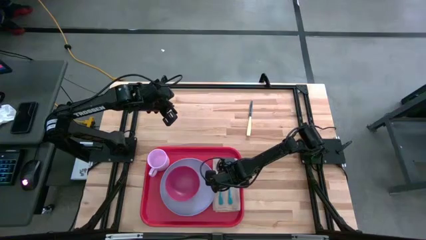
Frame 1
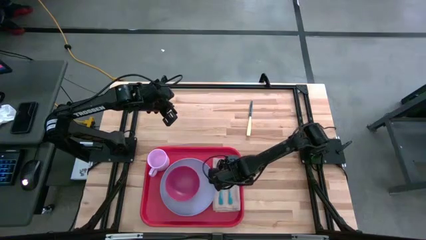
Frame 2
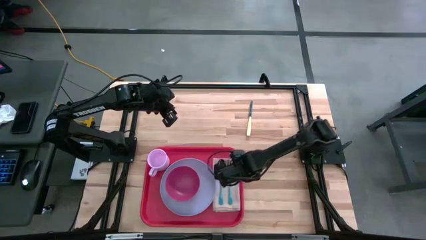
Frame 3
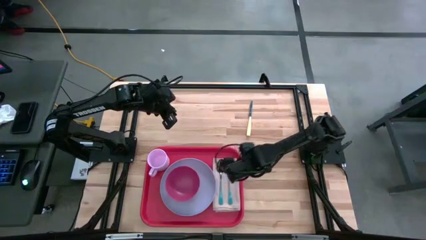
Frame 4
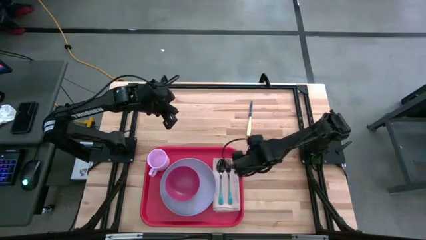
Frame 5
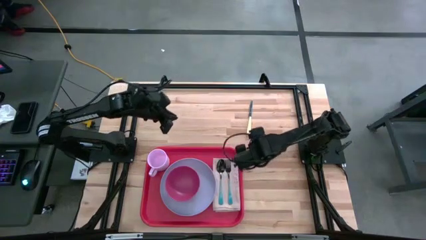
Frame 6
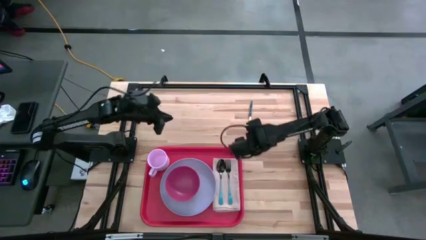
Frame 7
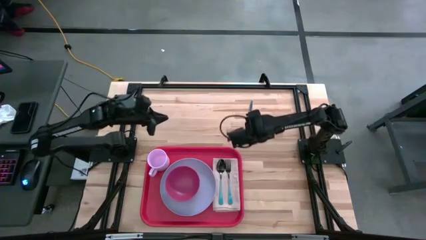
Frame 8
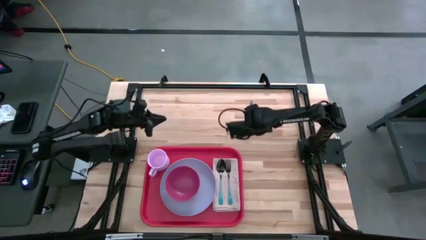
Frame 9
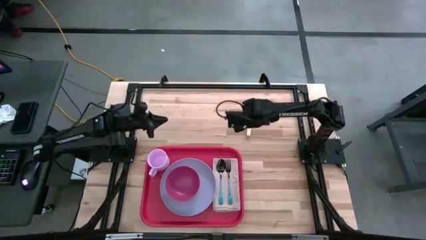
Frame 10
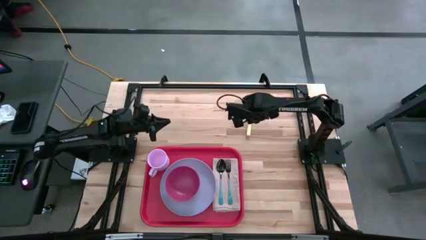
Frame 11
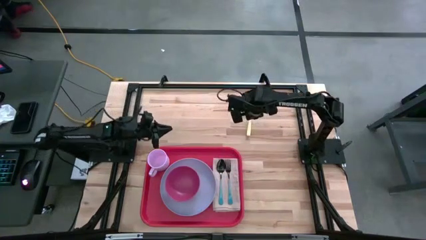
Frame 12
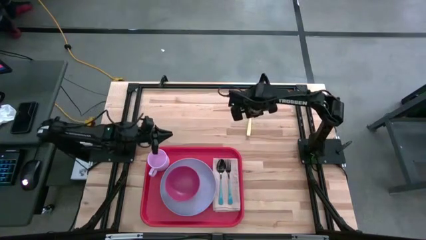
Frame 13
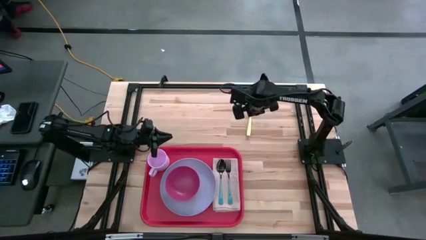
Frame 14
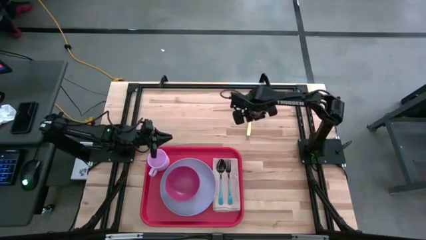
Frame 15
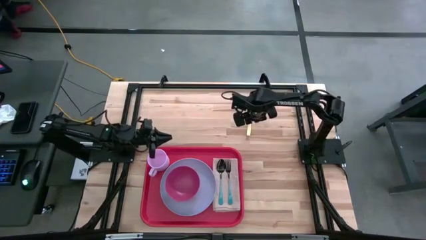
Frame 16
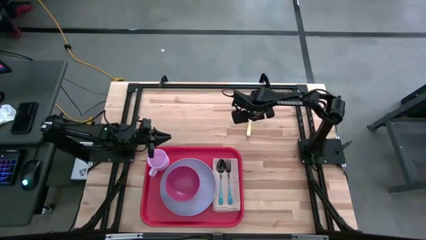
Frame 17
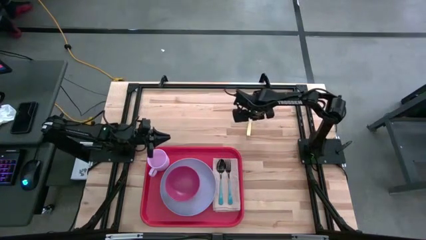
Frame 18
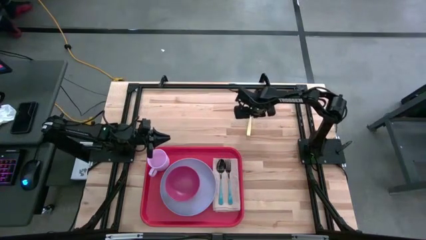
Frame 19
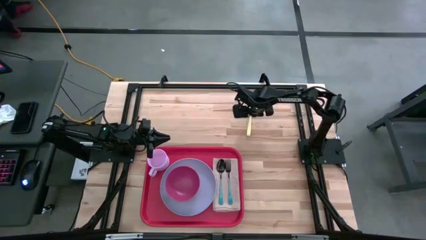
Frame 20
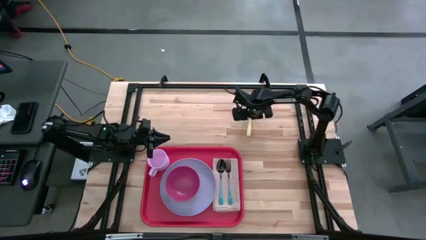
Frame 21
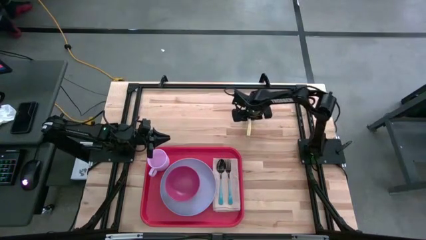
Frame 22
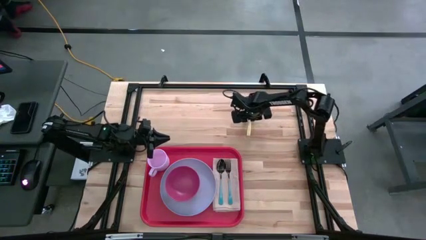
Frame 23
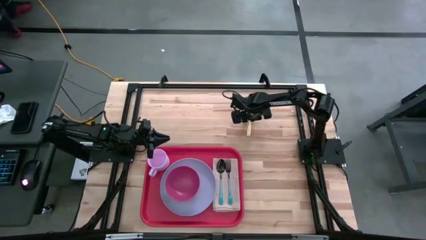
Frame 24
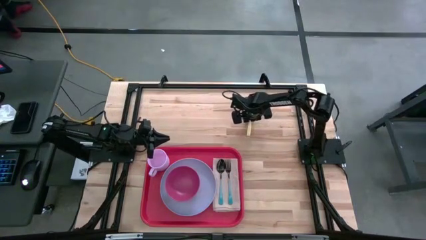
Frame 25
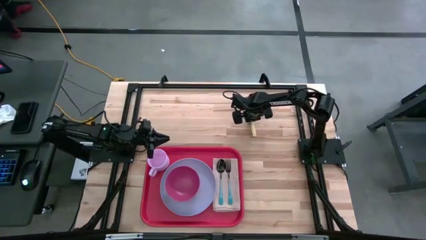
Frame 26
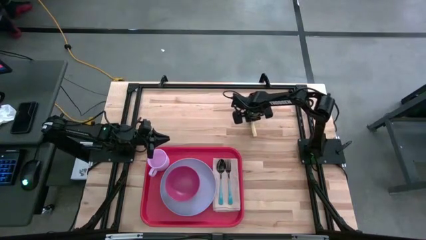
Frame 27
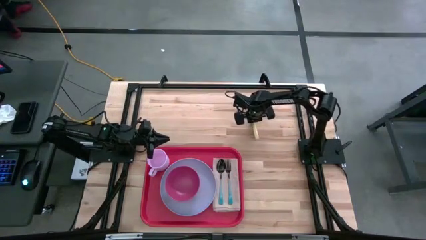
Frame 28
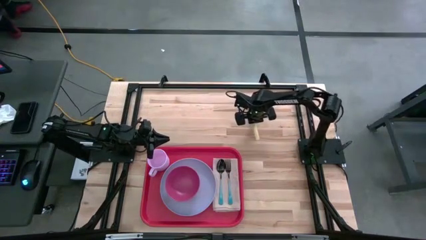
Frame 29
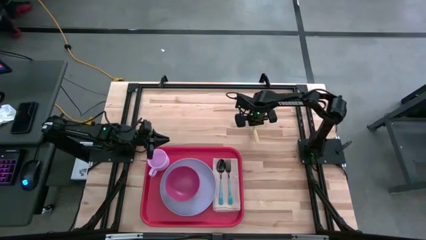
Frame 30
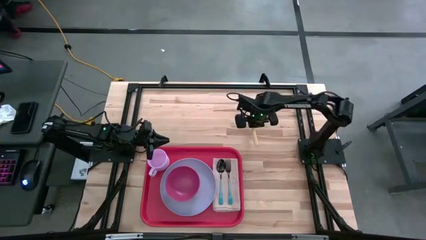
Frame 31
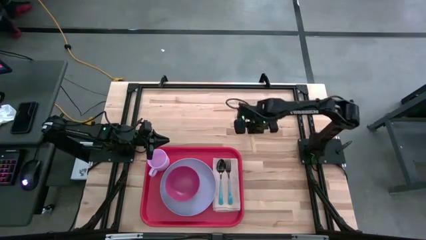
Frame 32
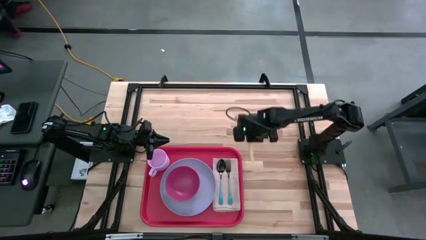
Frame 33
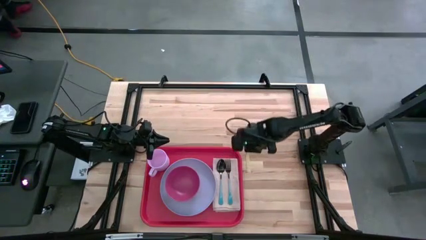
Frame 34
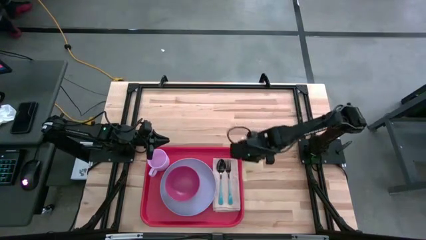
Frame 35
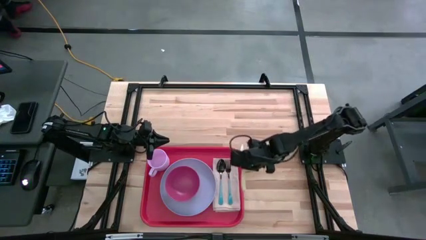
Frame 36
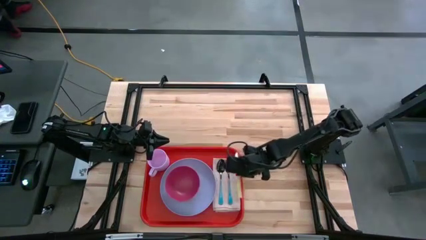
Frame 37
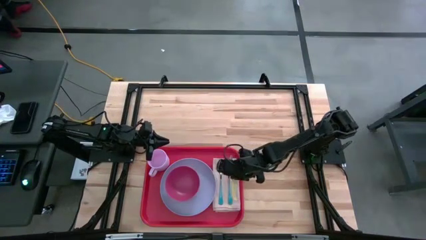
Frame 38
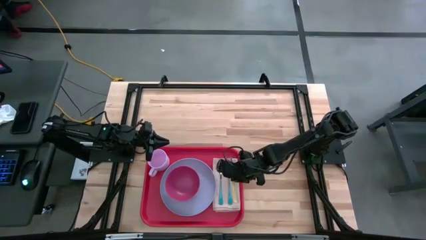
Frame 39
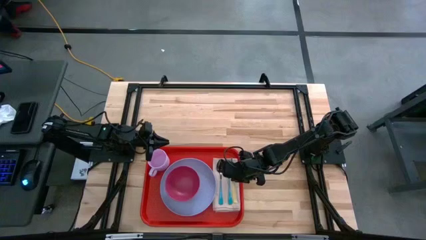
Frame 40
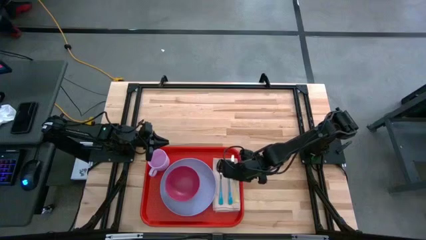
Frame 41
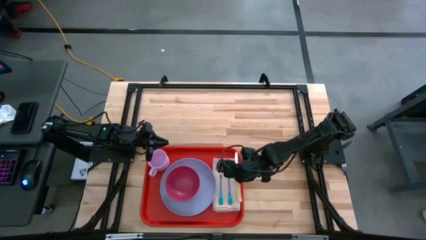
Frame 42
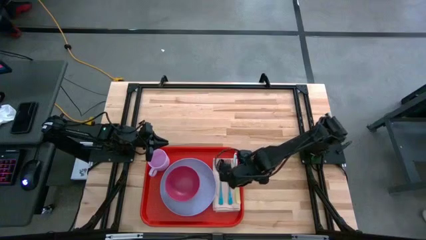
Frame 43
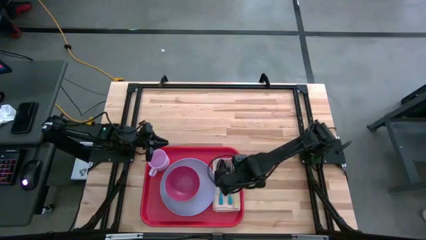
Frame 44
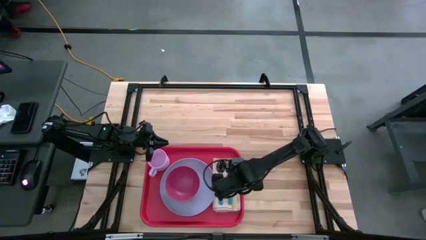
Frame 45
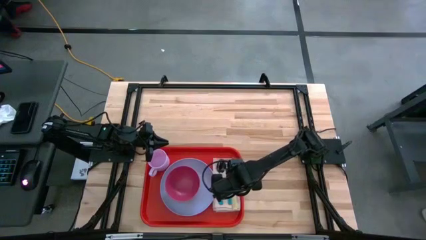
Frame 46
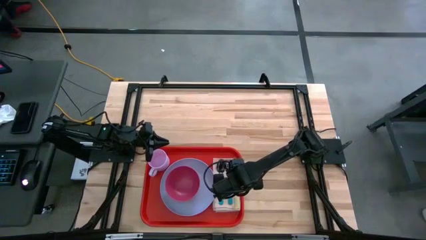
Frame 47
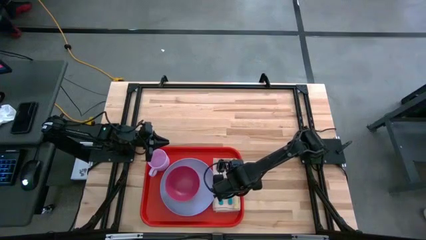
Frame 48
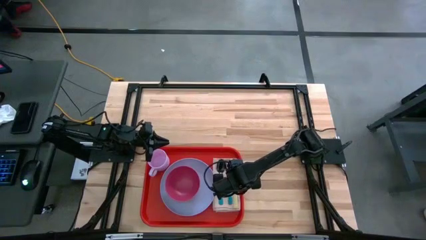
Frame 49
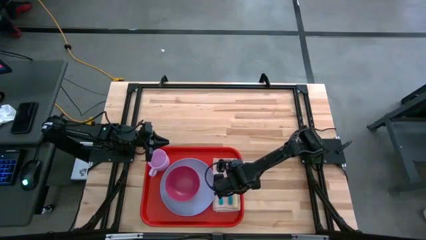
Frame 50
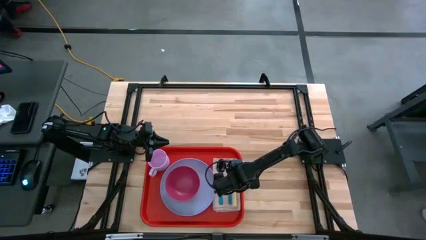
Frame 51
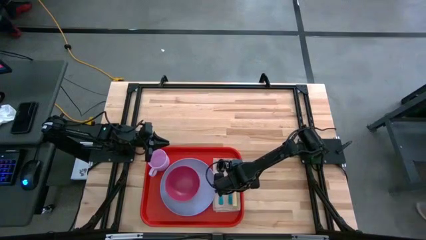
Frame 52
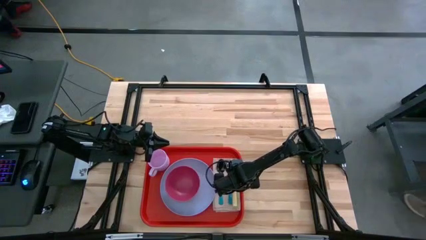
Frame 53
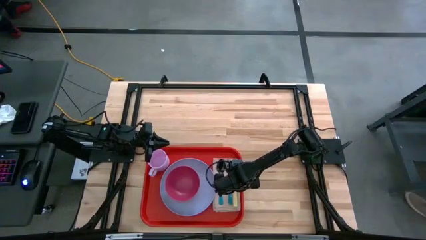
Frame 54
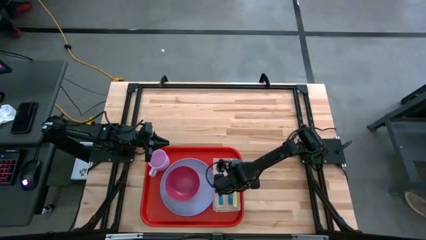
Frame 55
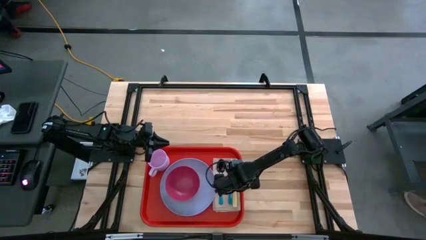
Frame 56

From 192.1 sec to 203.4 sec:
Task: Set up tray
Put the yellow knife to the right of the blue fork on the peach napkin on the orange serving tray
